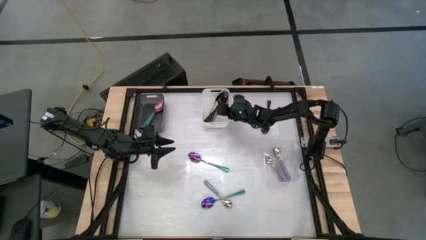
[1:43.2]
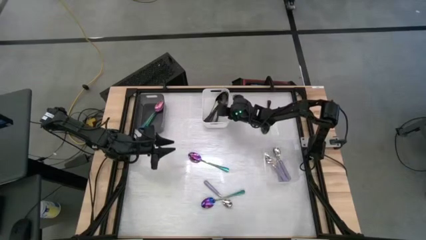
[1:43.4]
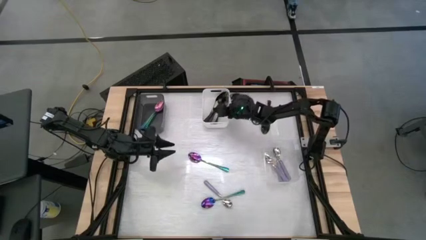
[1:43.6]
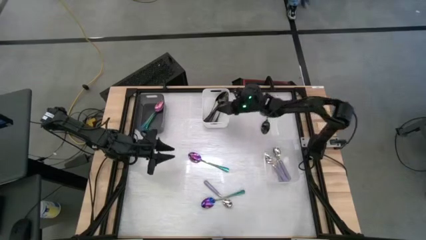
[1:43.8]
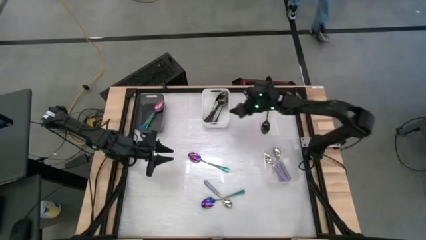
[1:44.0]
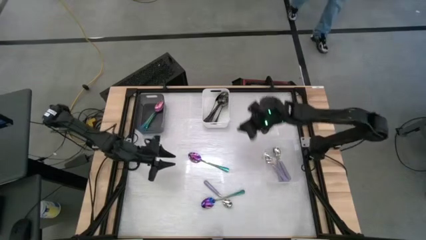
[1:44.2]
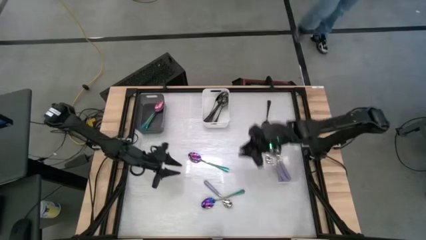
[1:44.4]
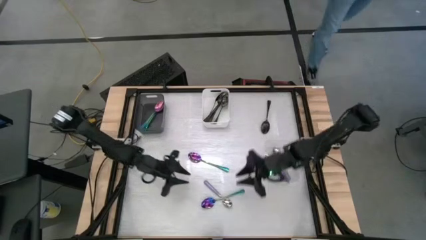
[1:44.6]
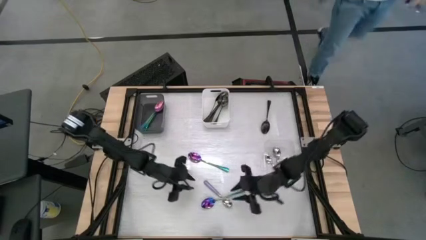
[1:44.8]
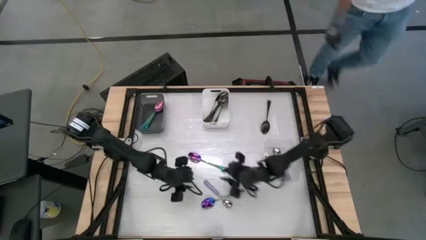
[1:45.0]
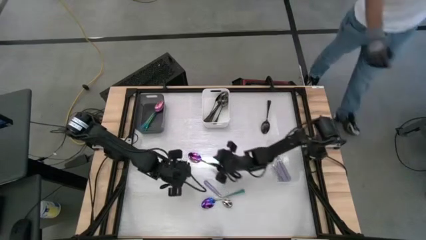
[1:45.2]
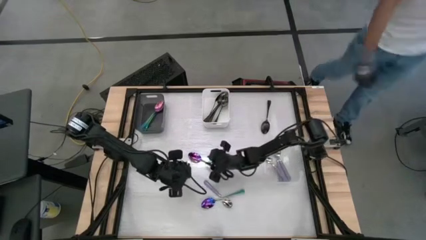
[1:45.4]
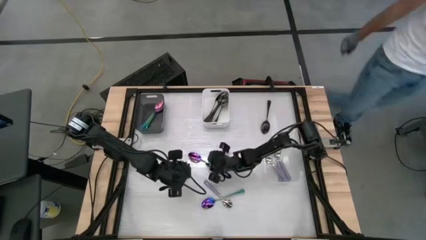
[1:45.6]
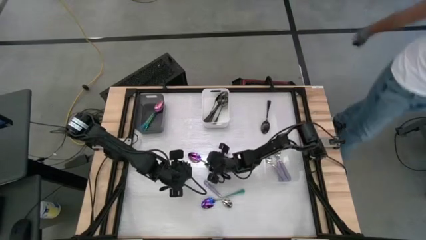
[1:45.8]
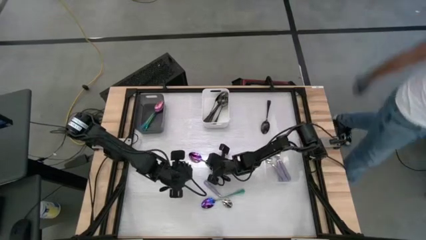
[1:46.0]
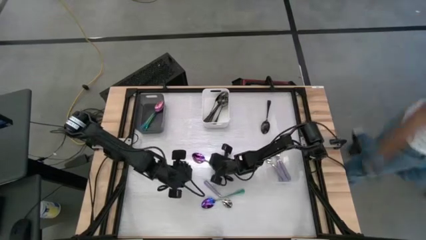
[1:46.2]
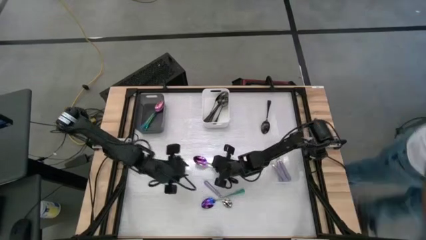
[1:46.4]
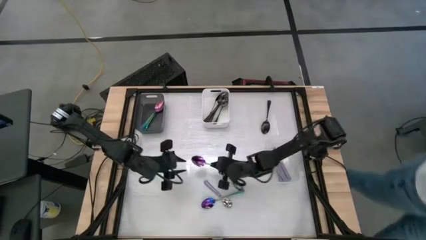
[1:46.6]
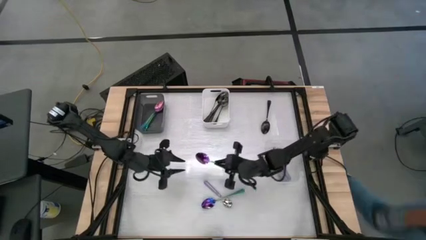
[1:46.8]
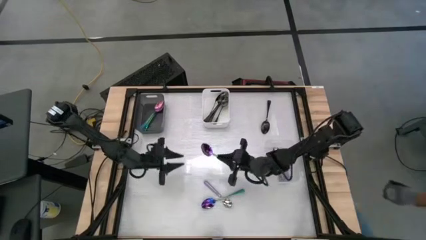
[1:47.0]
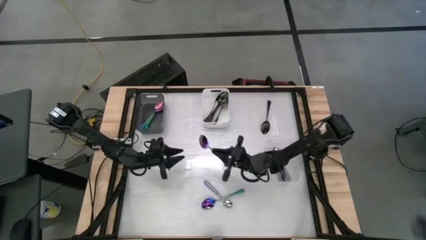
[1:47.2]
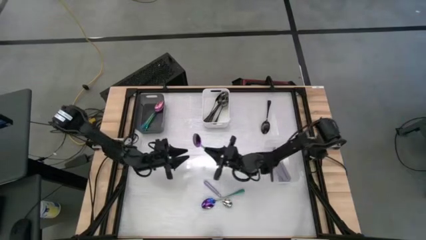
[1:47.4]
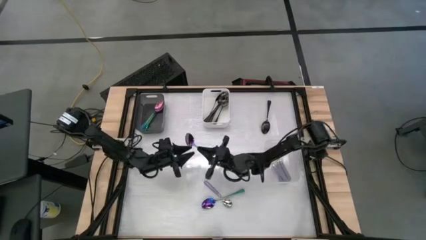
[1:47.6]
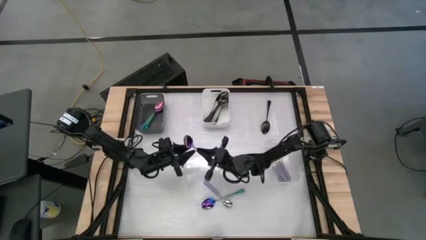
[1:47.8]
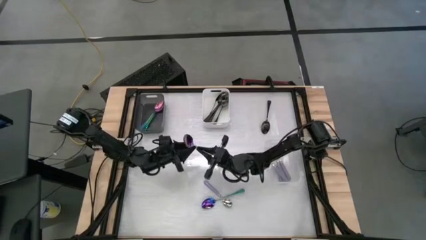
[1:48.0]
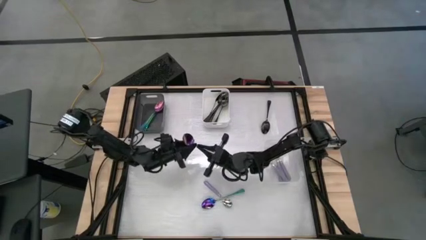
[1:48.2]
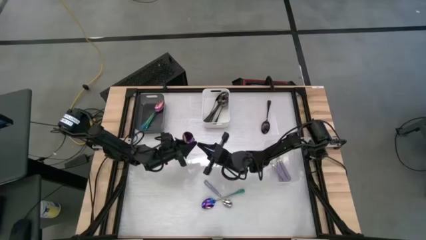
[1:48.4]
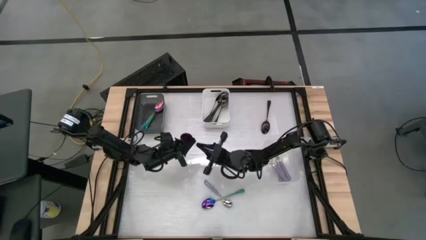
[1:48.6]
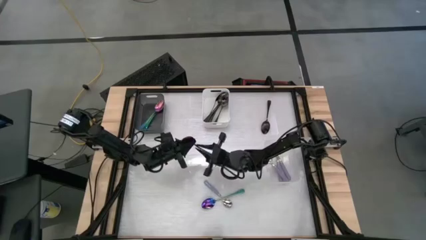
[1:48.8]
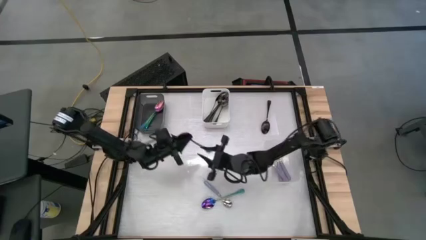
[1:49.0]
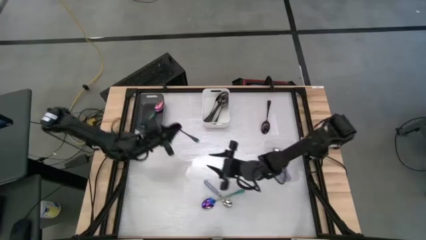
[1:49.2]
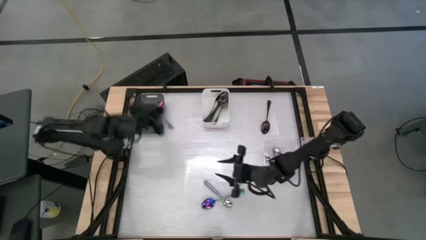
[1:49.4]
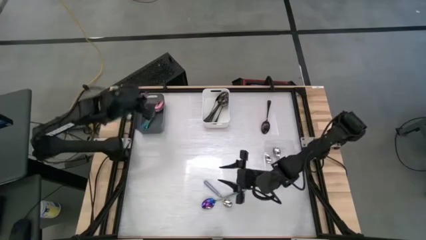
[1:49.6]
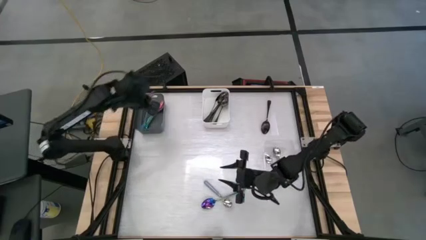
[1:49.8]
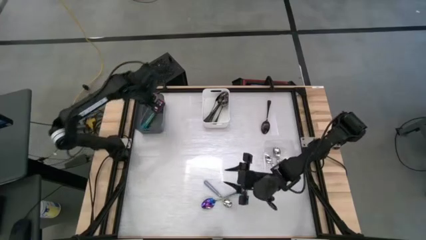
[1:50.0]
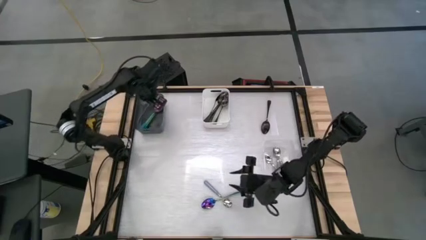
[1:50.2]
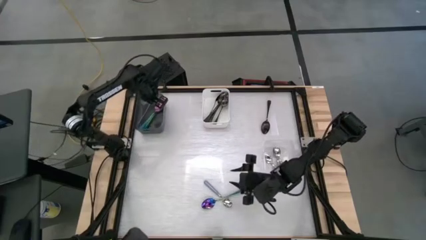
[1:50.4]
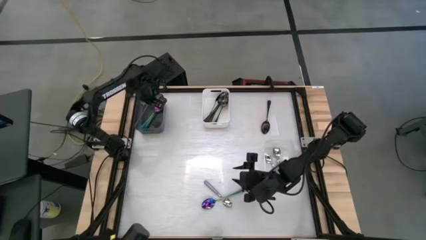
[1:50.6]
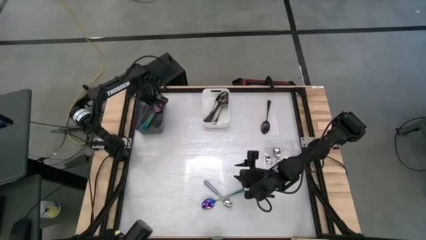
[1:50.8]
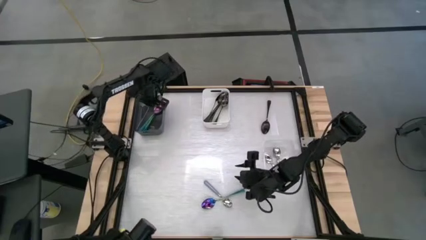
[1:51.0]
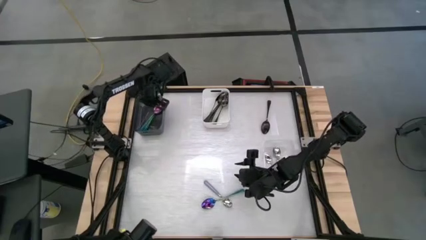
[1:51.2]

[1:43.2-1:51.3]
Task: Sort silverware by color (type)
Put the blue spoon into the black bin

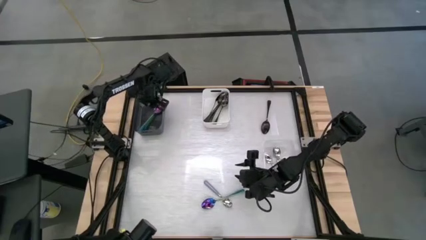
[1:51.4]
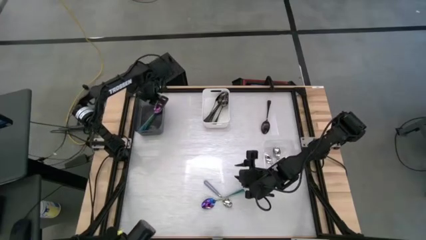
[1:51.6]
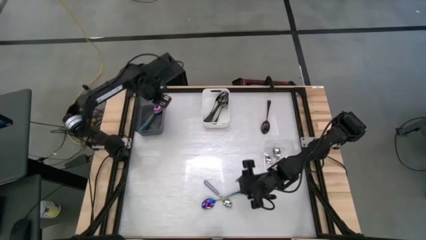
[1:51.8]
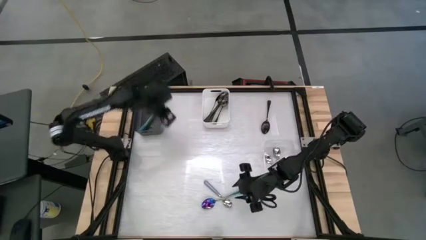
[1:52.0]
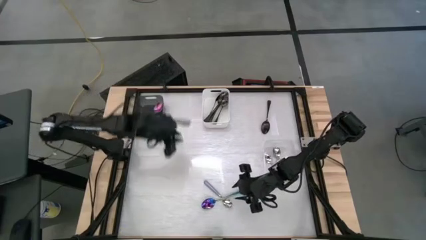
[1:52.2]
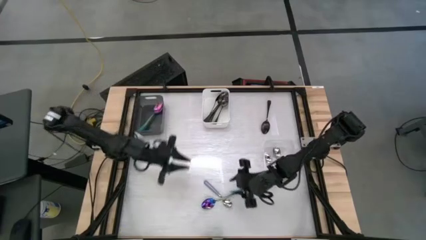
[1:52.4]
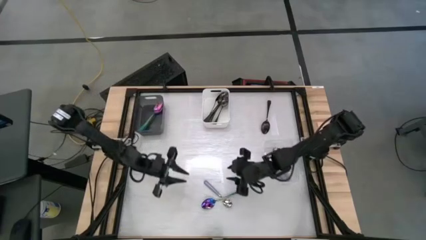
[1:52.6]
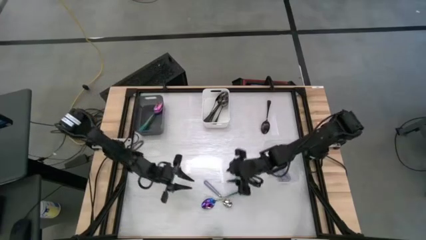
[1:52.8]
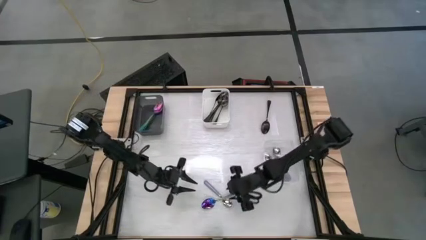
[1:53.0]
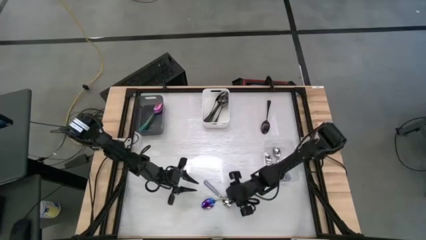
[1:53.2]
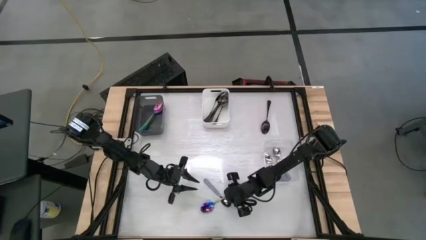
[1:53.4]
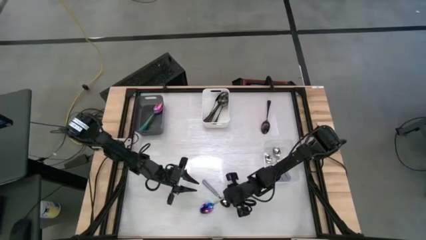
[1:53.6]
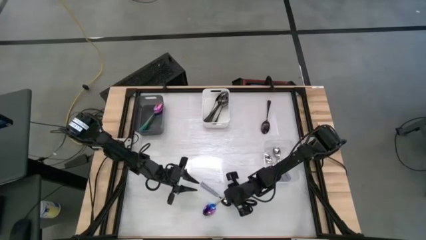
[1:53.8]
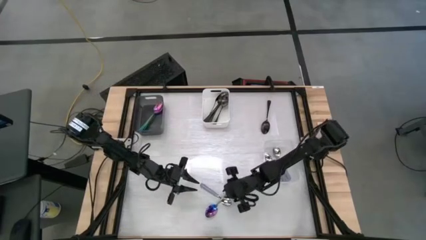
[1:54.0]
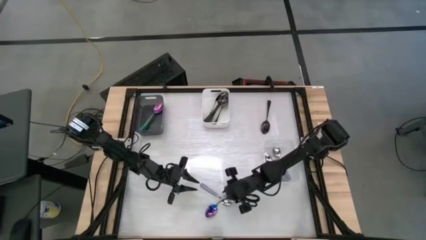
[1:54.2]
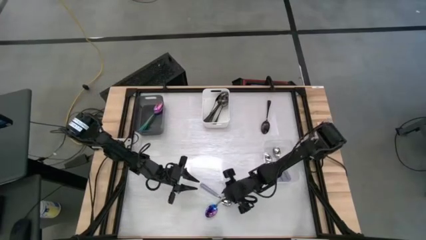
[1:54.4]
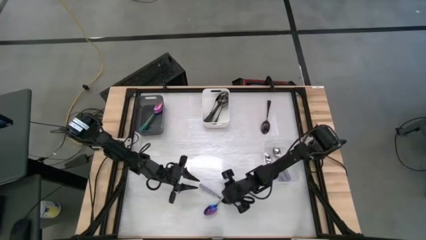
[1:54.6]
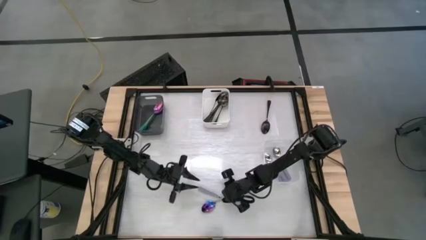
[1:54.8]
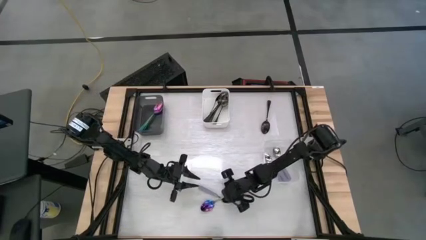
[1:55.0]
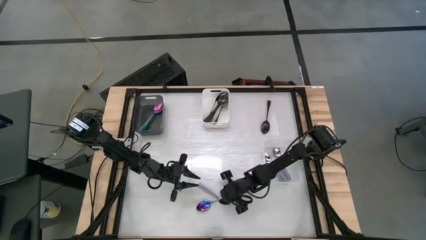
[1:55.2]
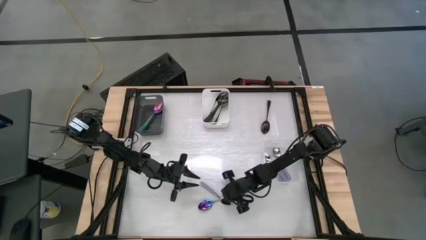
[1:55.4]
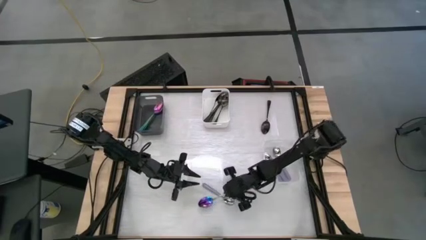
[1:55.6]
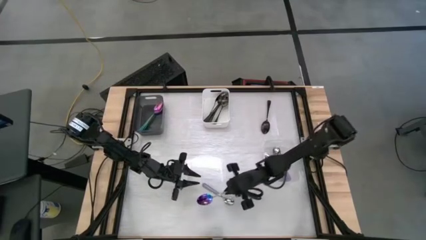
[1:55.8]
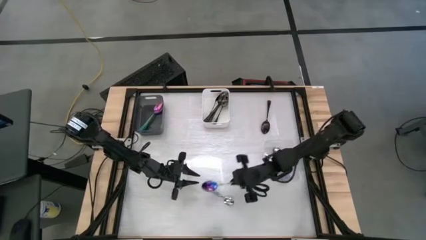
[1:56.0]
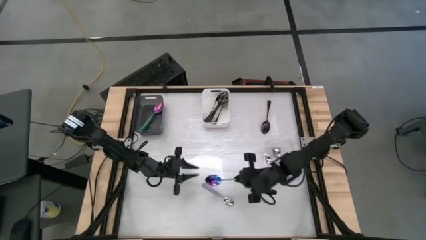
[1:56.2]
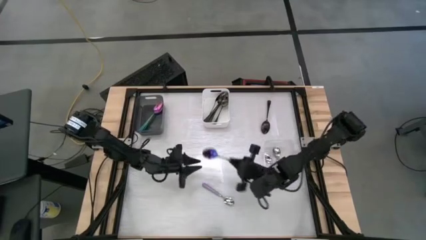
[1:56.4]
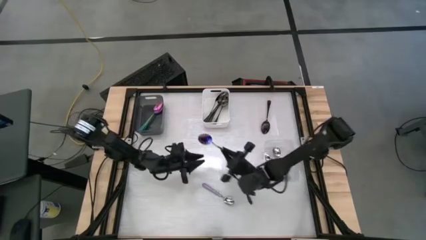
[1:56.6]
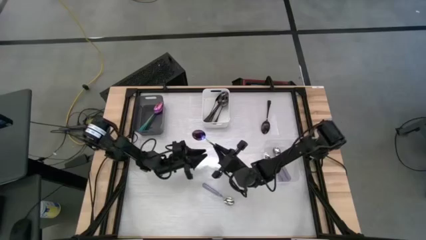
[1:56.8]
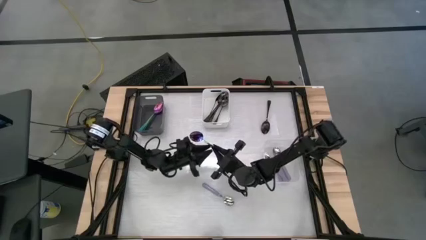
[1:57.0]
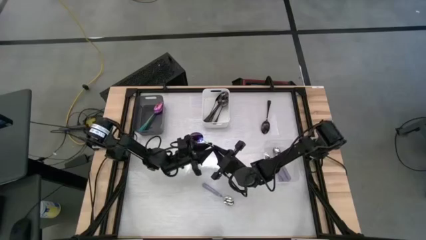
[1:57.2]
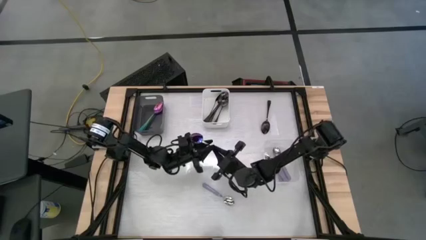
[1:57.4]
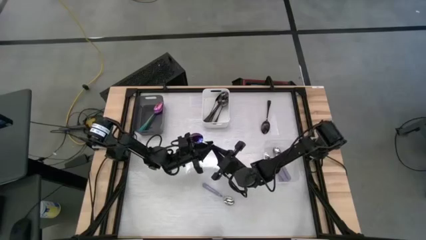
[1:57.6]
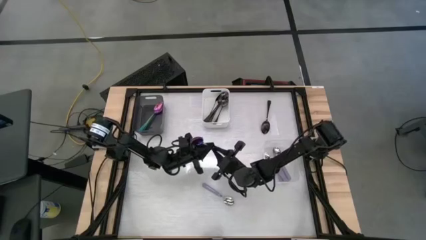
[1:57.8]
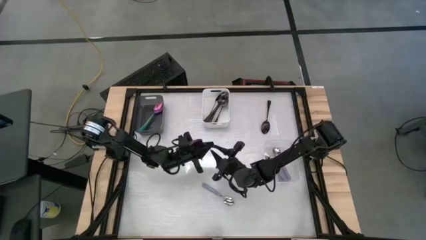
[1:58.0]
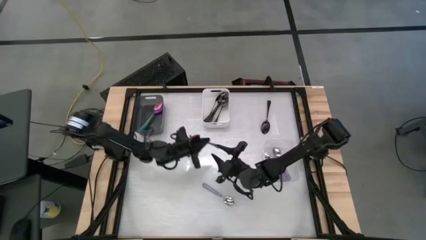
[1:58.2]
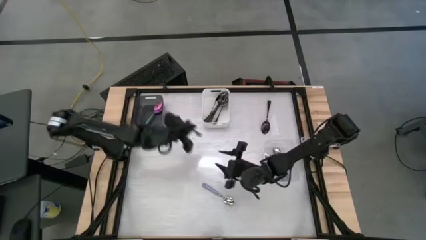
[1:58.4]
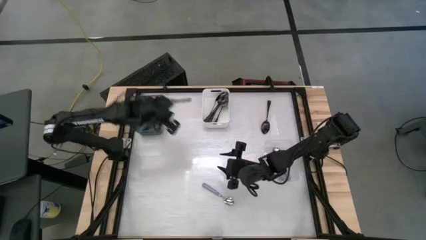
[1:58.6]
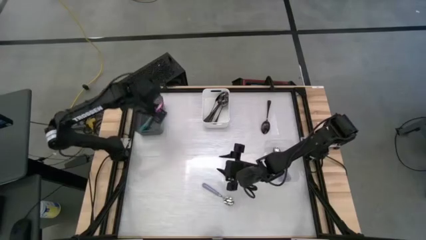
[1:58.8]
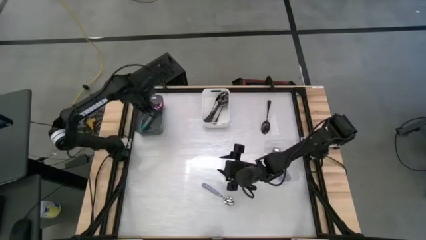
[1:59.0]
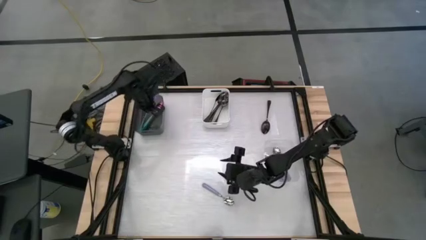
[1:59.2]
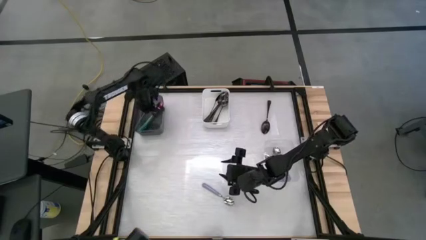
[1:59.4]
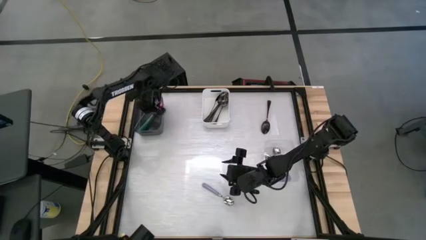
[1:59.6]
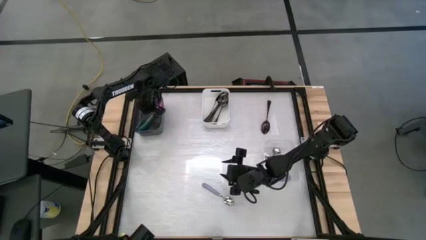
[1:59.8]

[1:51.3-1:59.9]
Put the blue spoon into the black bin
